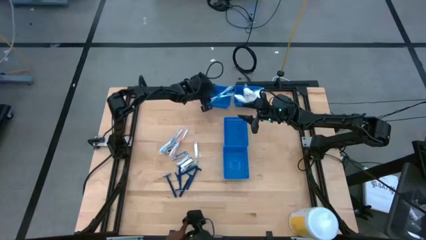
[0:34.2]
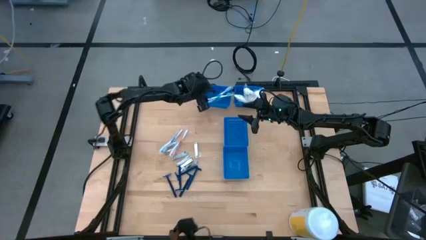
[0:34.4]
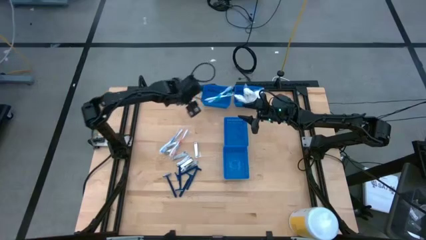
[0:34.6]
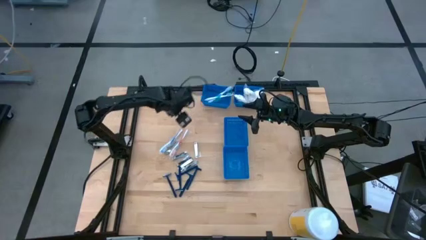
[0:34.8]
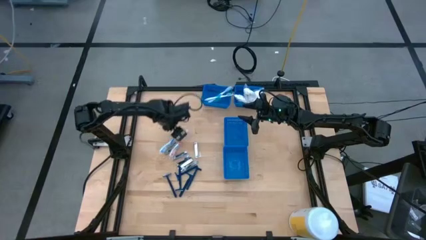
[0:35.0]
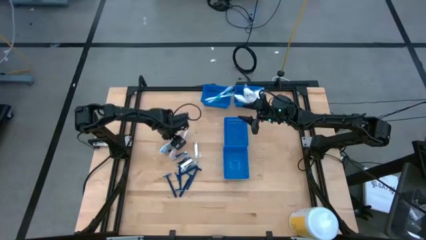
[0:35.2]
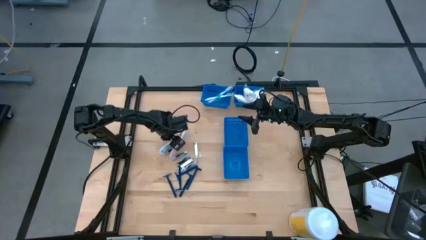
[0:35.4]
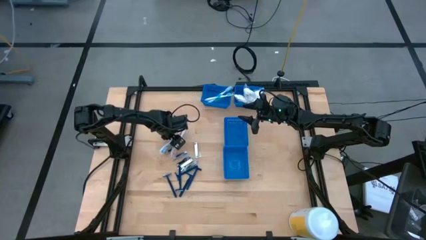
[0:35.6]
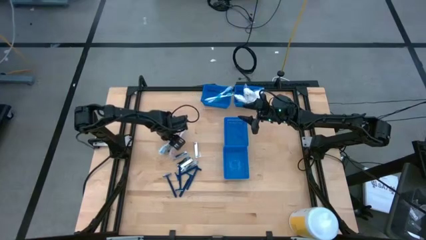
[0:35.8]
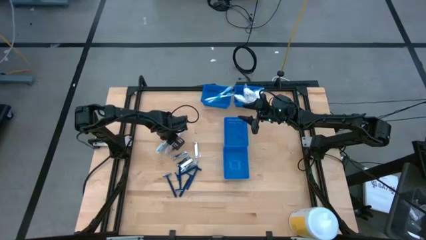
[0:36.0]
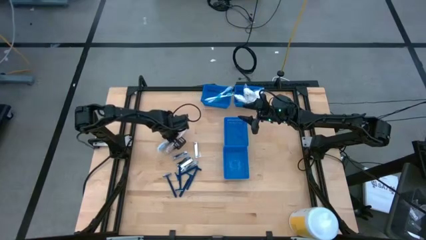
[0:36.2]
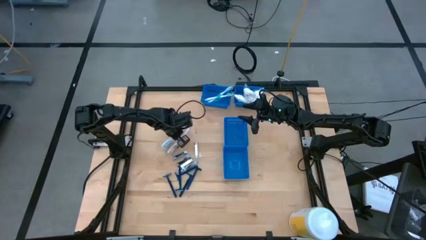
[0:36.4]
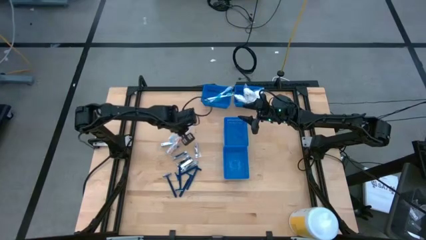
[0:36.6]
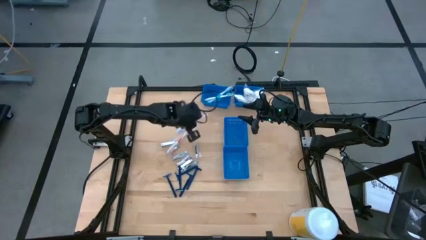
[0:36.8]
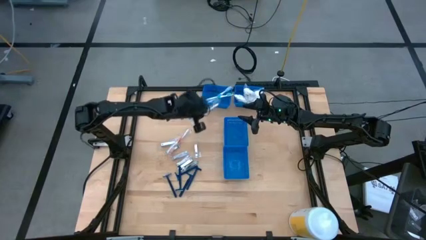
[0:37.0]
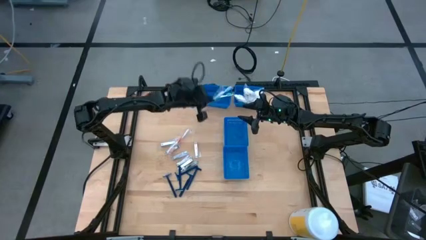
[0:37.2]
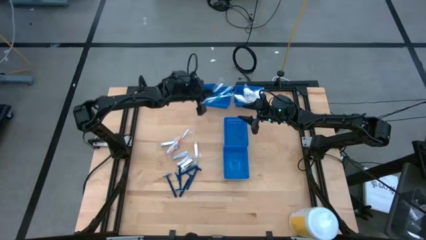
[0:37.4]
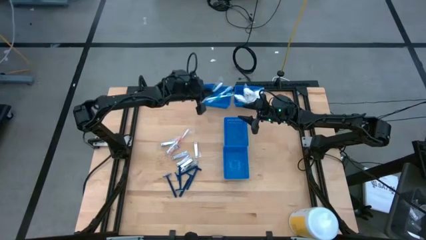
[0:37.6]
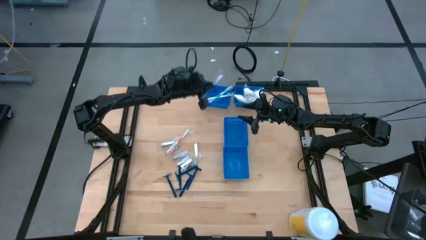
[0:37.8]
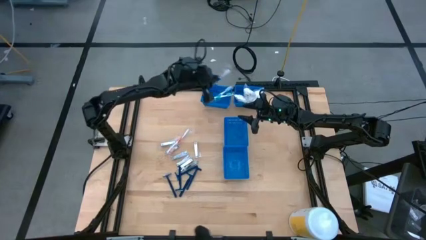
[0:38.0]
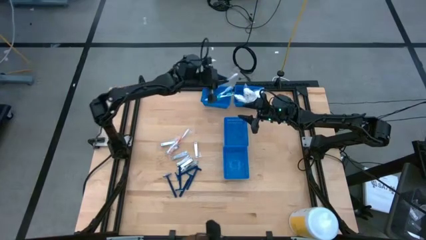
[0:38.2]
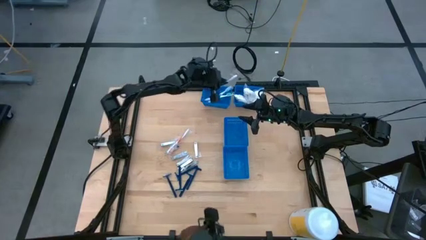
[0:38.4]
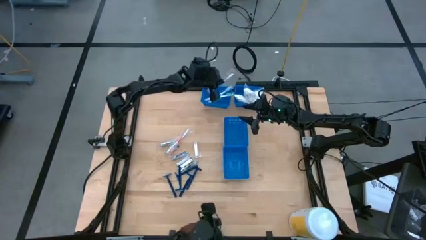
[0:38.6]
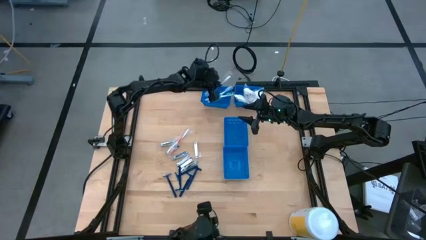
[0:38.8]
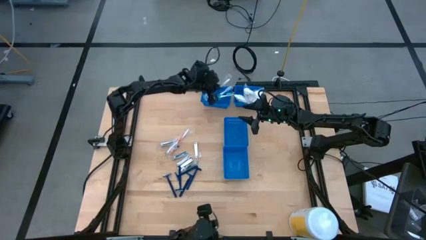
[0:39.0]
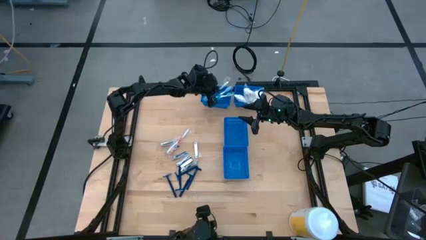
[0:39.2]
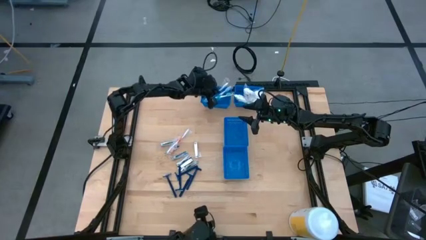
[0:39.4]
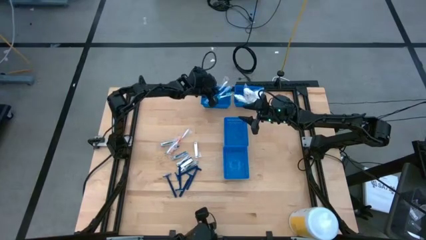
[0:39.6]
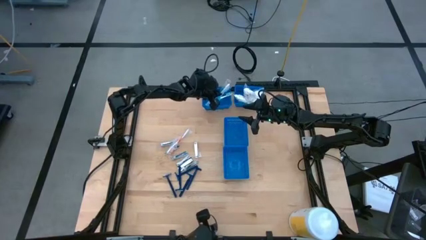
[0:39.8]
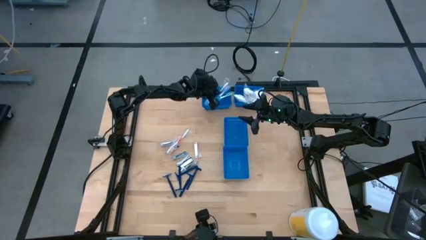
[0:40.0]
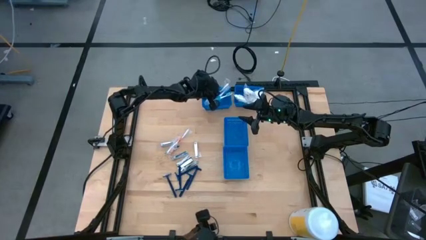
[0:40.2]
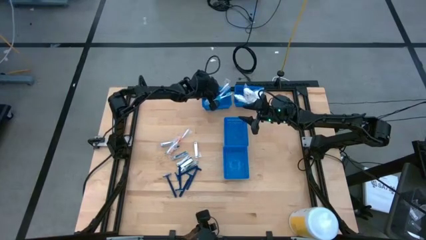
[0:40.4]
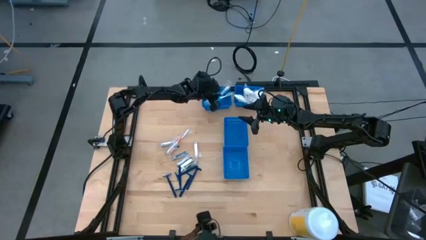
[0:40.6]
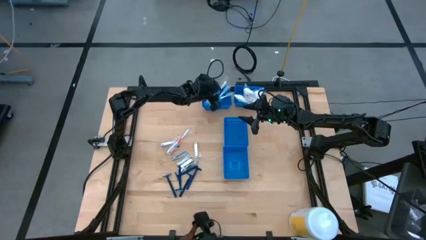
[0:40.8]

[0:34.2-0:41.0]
Task: Pick & Place Travel size toiletries
Put the blue toothbrush into the top left blue bin

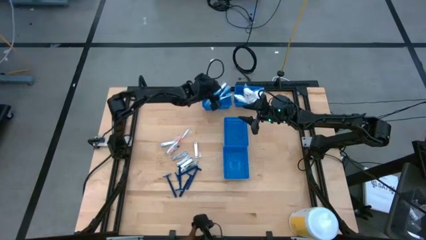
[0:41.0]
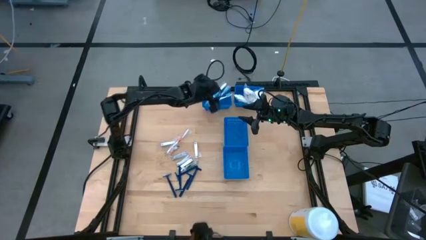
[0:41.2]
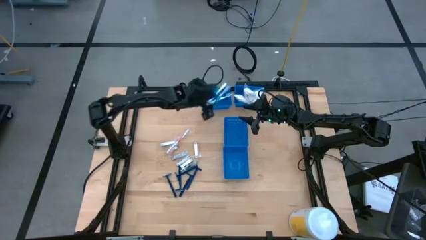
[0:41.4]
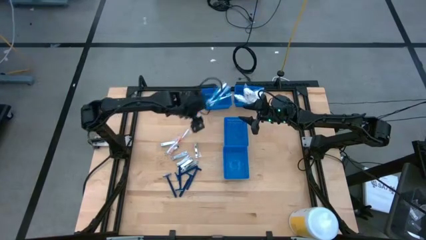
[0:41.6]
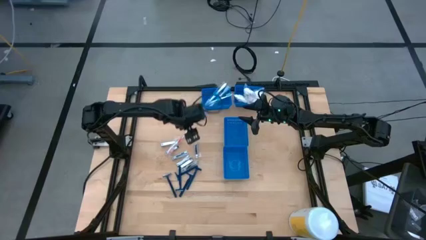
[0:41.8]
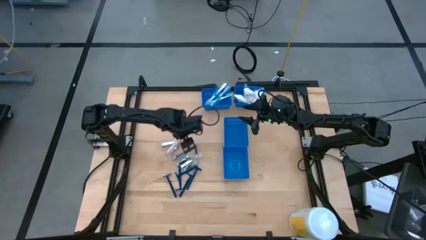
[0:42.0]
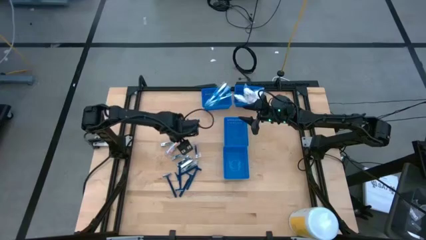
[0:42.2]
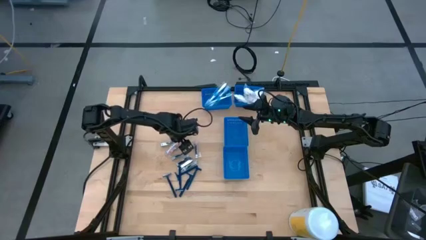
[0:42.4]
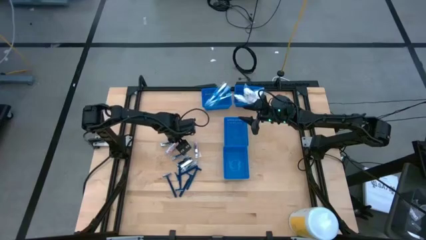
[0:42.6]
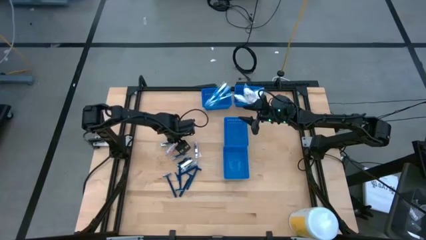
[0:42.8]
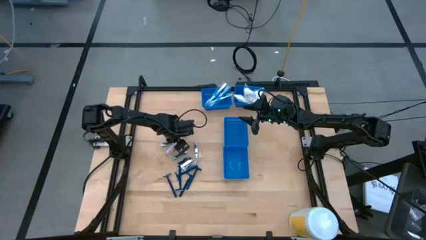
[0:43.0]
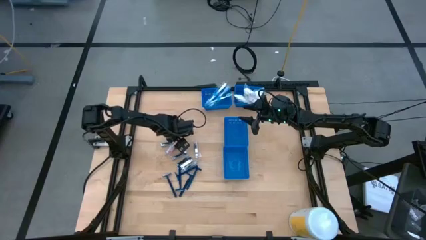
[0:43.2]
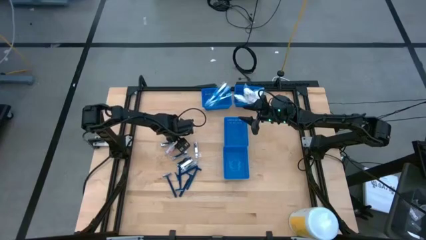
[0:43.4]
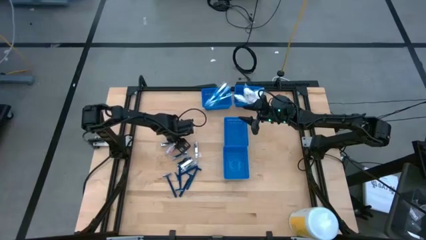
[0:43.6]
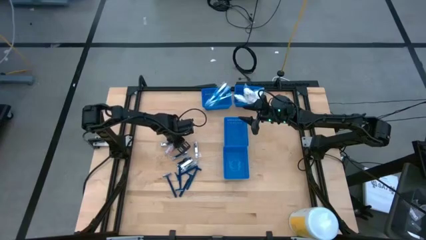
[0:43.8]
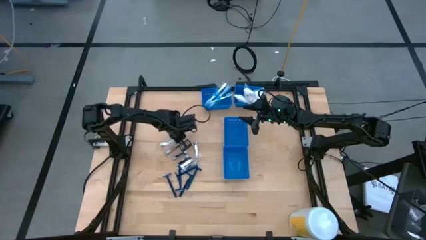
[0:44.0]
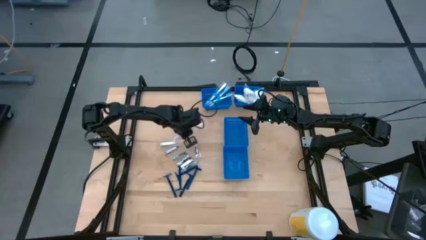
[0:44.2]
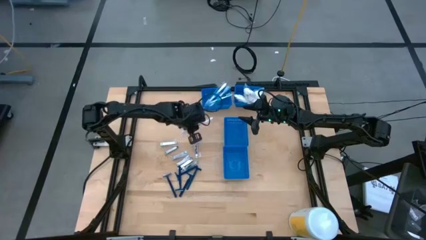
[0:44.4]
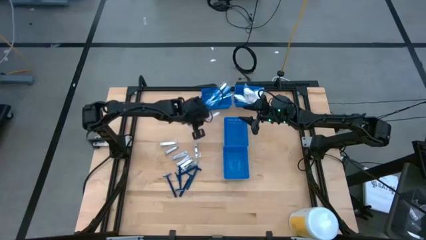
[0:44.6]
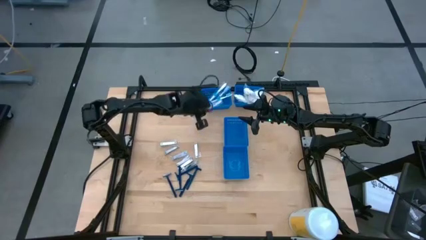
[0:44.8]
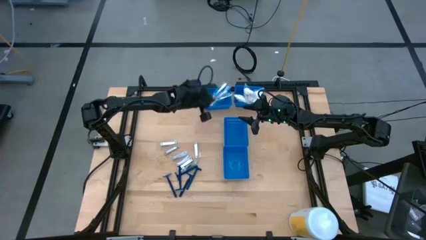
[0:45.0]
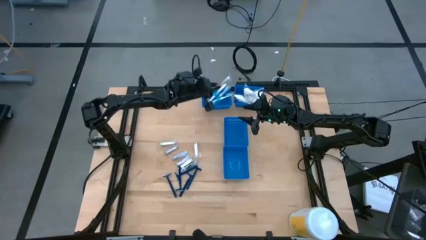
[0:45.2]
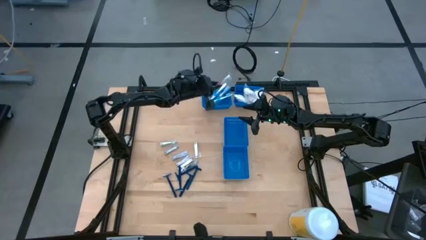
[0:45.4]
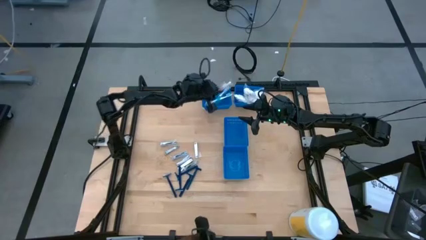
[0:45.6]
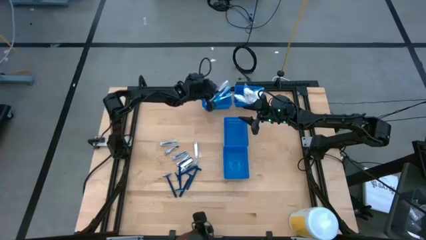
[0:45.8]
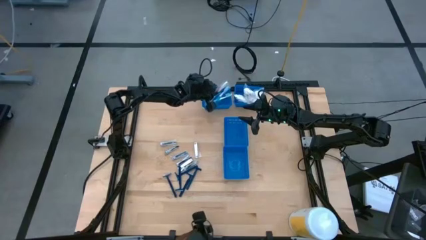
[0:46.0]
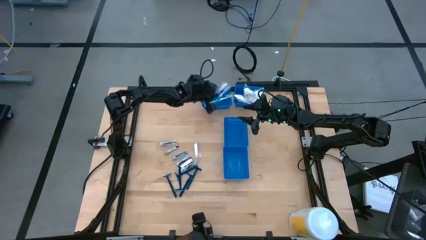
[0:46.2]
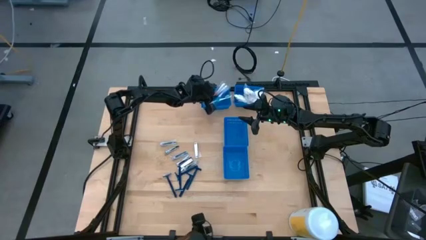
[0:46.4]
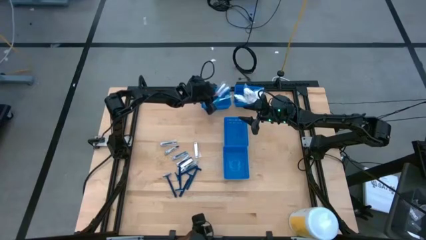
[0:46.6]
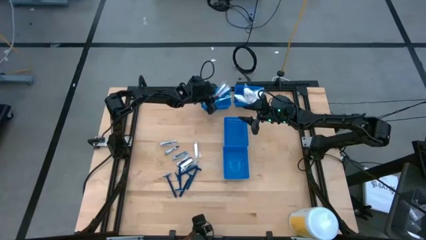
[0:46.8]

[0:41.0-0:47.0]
Put the red toothbrush into the top left blue bin

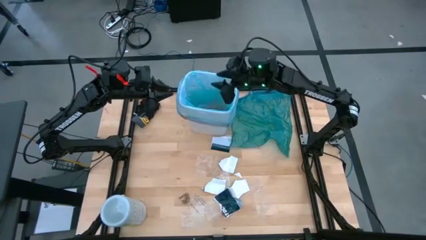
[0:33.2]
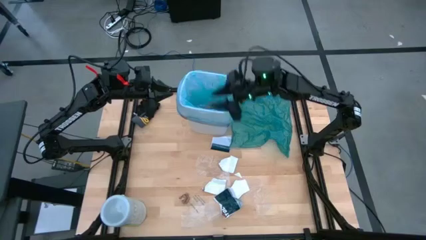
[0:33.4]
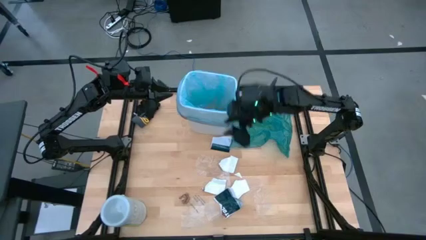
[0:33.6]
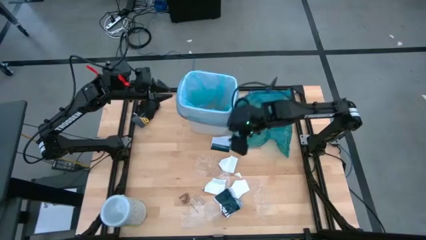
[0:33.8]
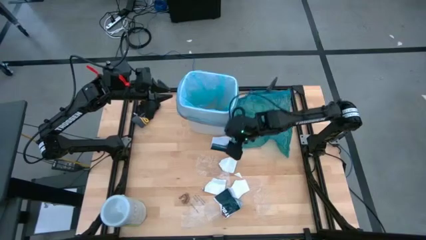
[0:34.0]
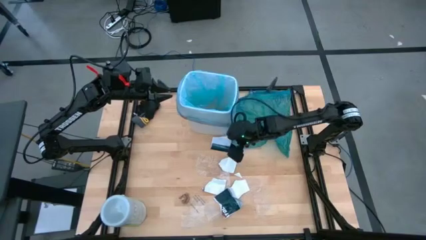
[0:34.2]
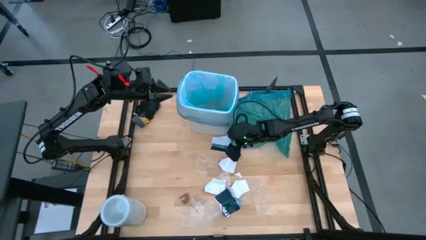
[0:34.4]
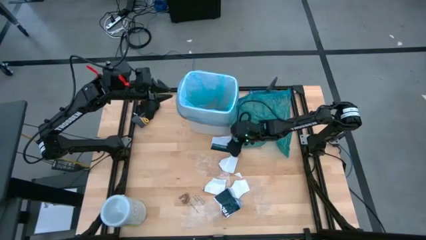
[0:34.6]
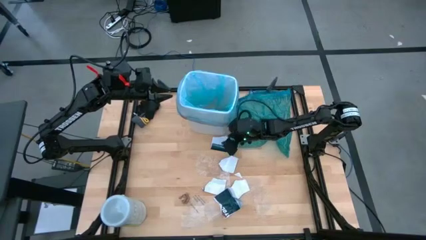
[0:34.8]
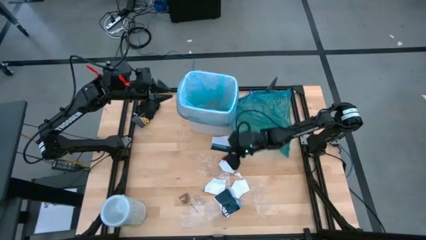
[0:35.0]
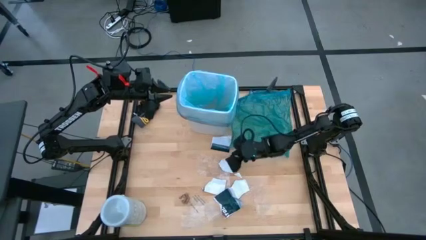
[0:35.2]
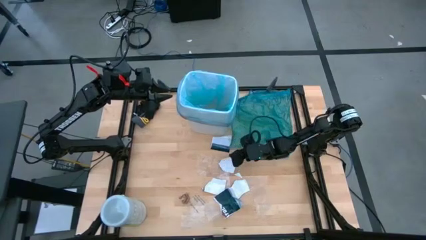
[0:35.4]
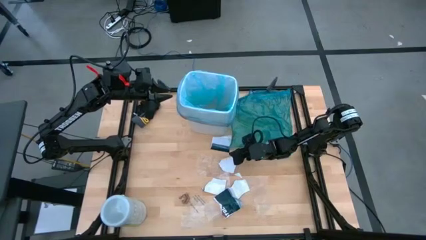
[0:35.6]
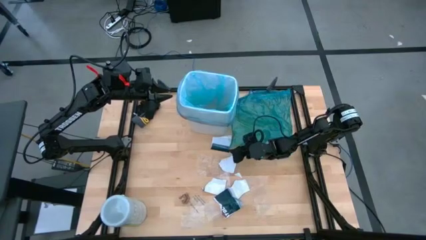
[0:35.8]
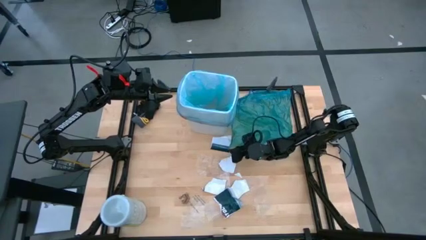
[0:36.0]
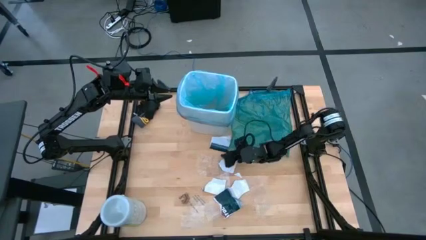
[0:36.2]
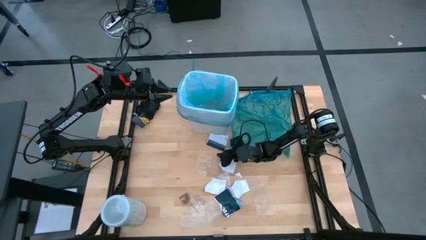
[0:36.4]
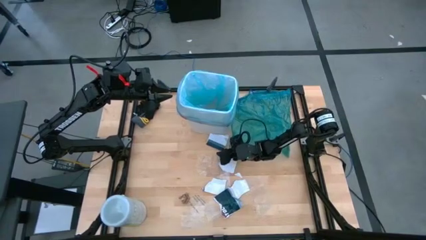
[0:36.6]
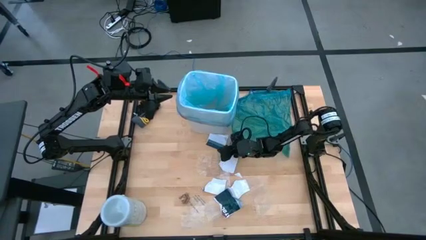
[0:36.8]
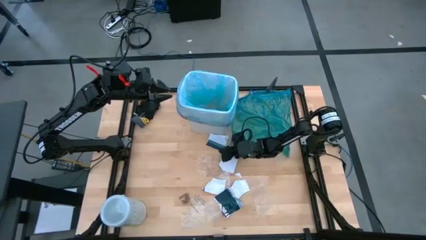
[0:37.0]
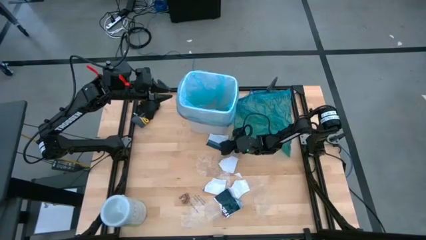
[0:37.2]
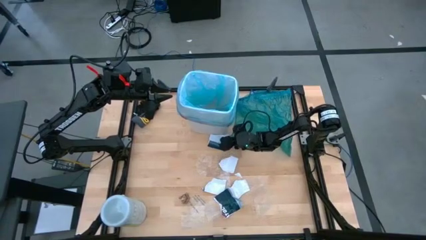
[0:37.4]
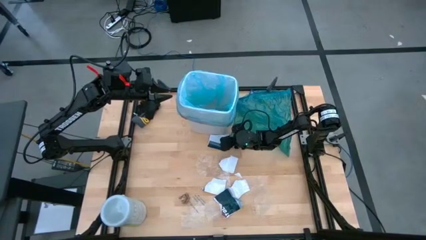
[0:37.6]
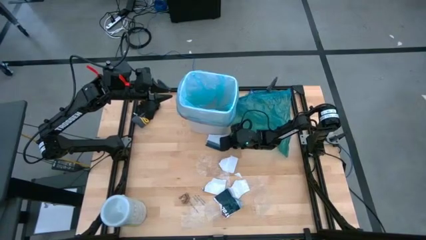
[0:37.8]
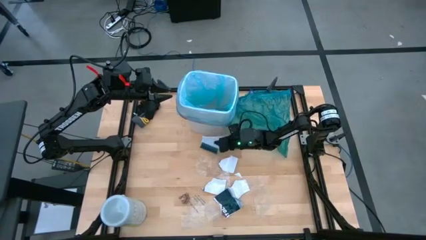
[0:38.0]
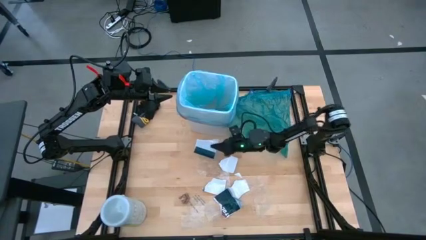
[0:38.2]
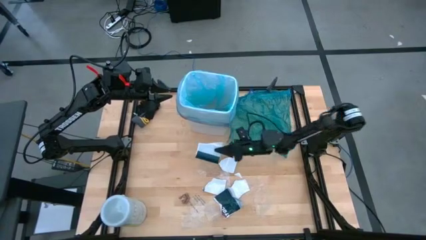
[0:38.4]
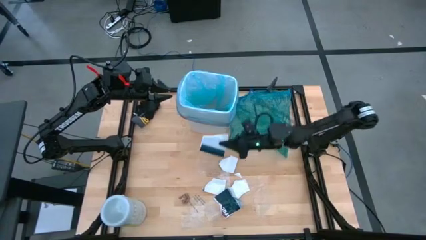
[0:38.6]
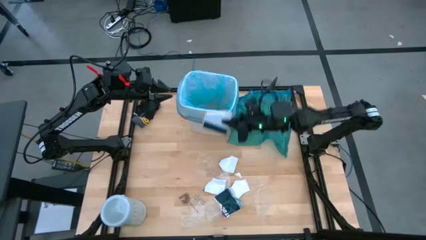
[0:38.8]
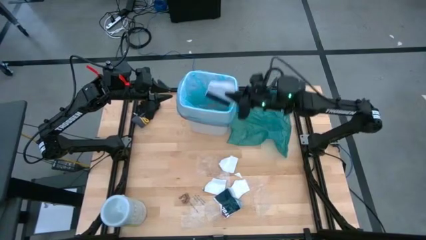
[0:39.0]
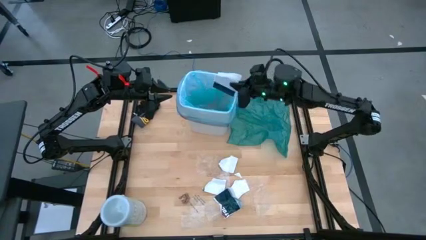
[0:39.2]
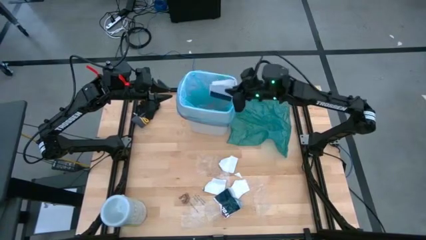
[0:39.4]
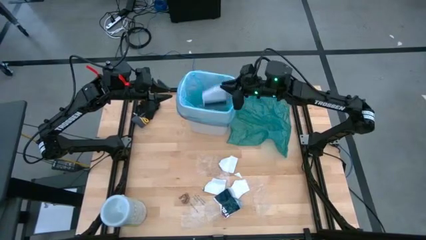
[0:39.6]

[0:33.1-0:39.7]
Task: place trash/remove bag and relplace
Put the white magazine paper into the trash bin
